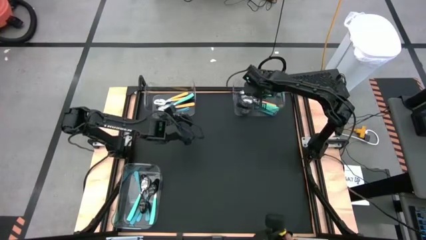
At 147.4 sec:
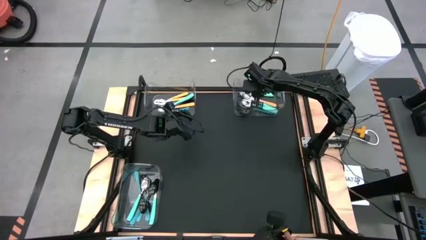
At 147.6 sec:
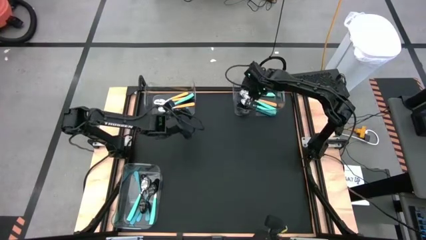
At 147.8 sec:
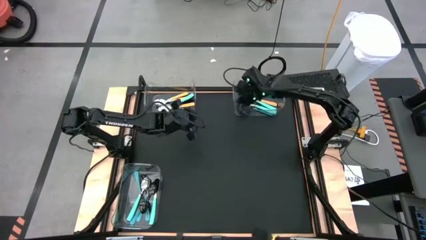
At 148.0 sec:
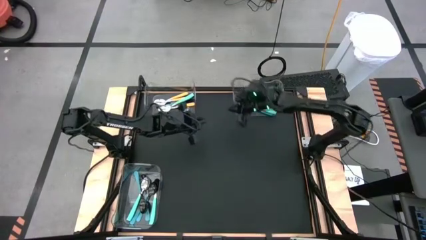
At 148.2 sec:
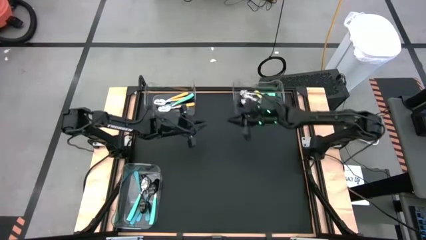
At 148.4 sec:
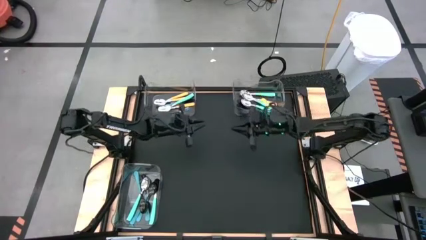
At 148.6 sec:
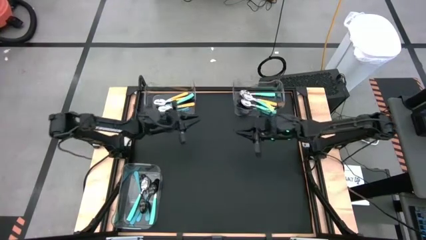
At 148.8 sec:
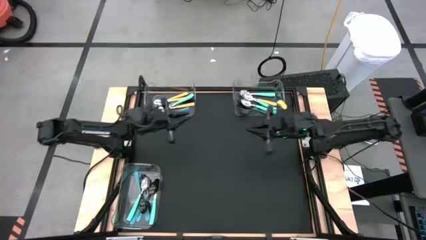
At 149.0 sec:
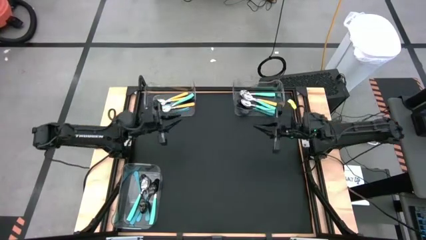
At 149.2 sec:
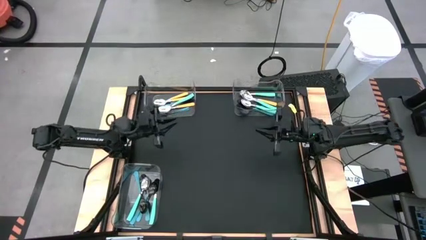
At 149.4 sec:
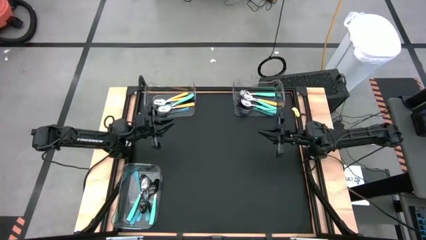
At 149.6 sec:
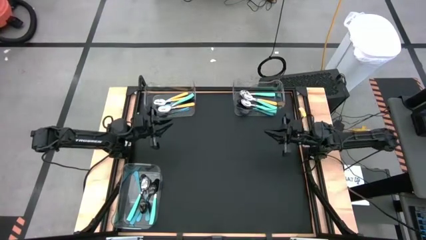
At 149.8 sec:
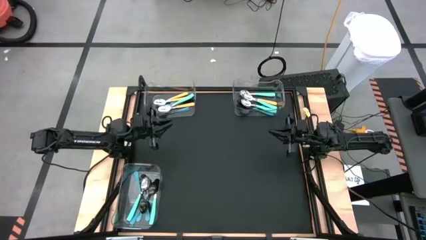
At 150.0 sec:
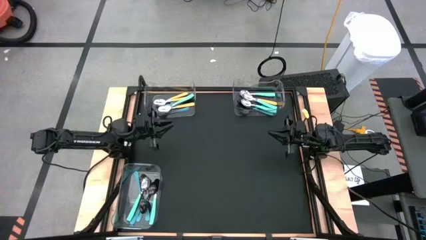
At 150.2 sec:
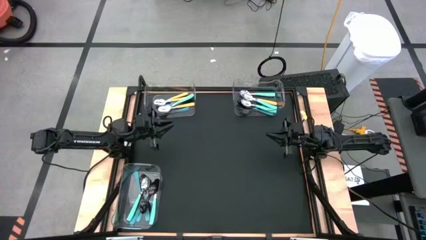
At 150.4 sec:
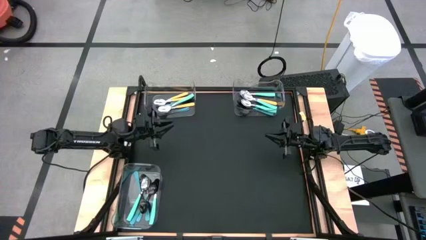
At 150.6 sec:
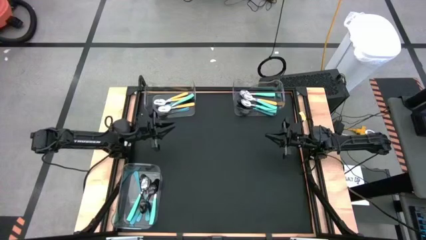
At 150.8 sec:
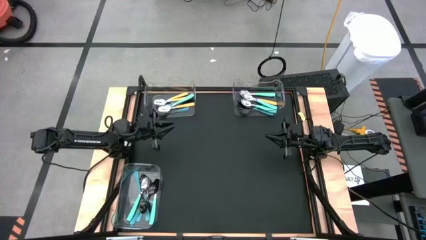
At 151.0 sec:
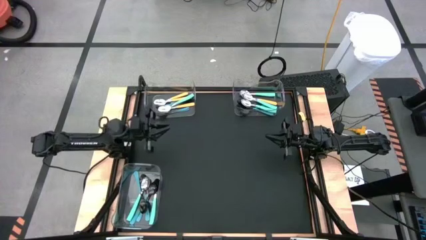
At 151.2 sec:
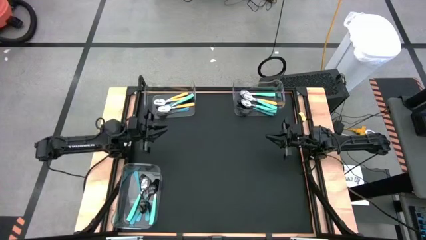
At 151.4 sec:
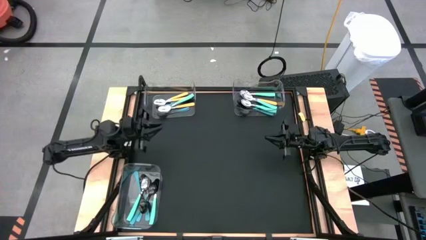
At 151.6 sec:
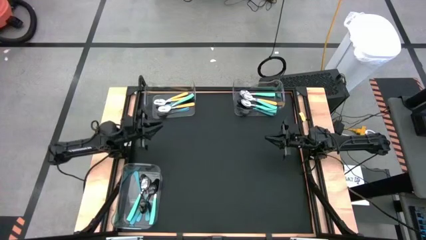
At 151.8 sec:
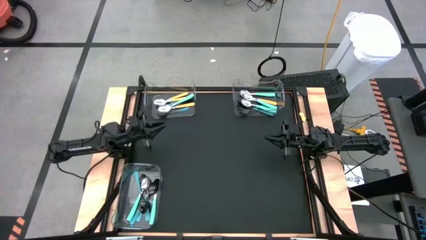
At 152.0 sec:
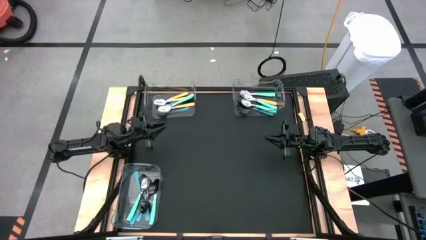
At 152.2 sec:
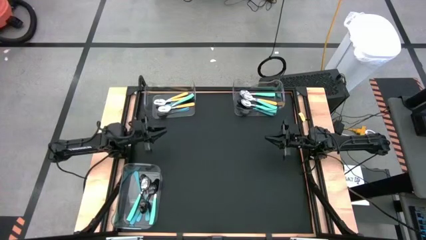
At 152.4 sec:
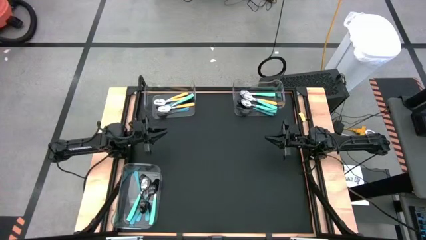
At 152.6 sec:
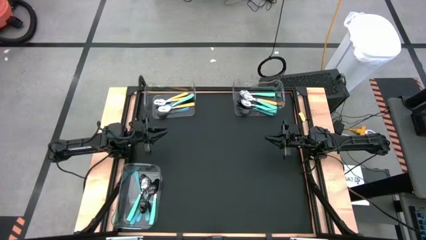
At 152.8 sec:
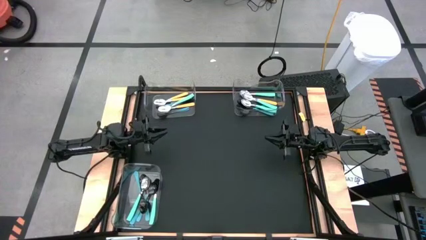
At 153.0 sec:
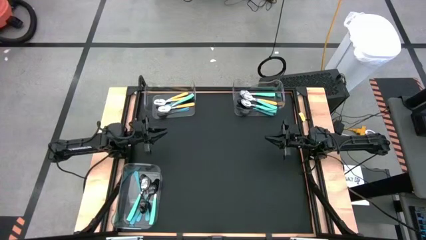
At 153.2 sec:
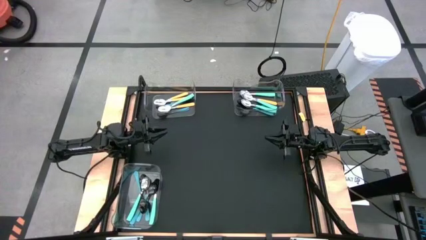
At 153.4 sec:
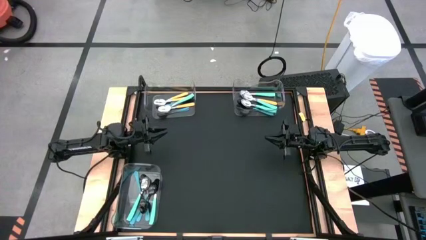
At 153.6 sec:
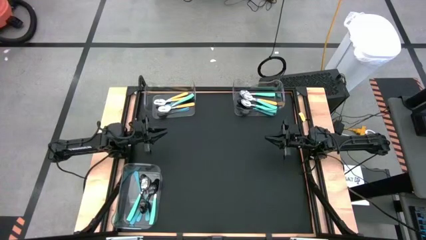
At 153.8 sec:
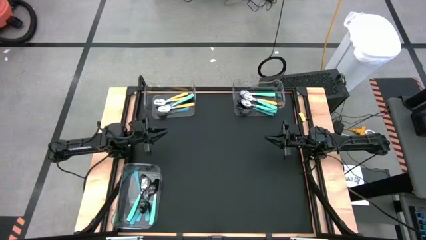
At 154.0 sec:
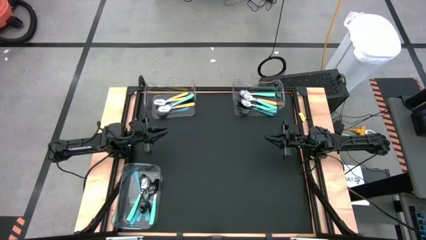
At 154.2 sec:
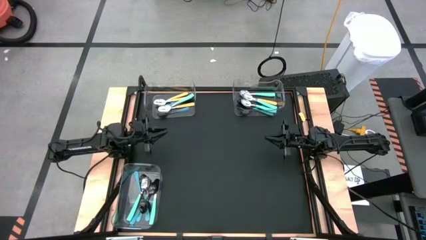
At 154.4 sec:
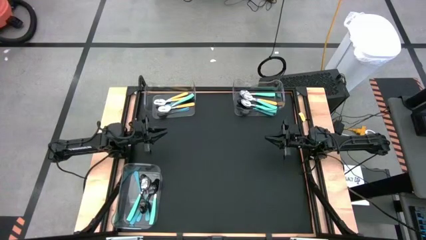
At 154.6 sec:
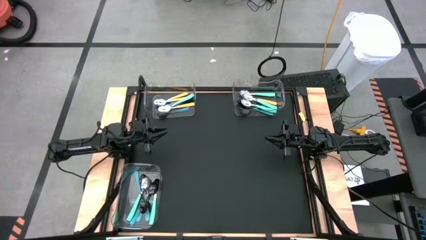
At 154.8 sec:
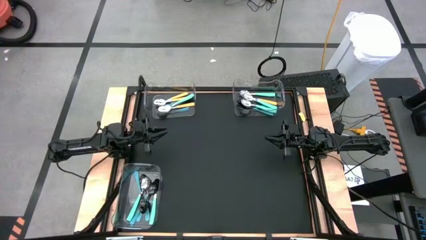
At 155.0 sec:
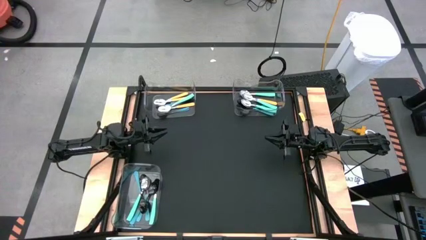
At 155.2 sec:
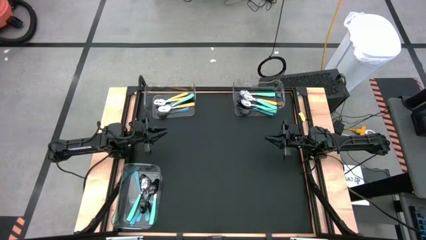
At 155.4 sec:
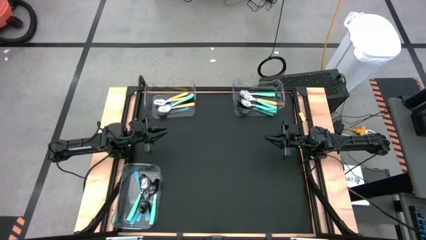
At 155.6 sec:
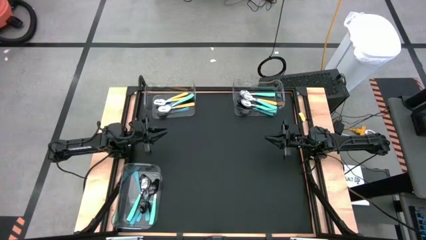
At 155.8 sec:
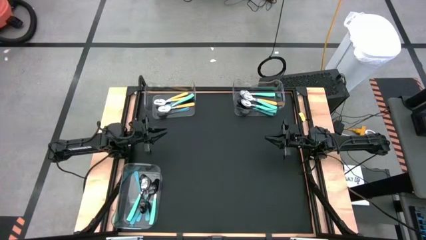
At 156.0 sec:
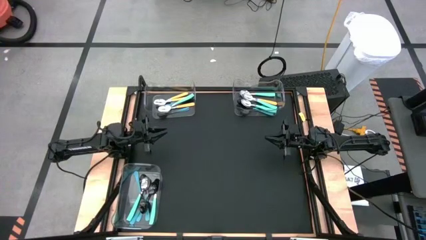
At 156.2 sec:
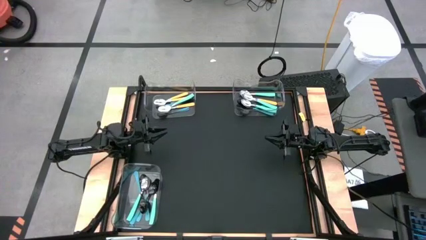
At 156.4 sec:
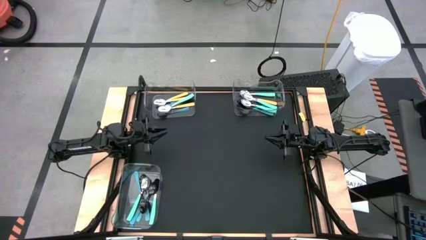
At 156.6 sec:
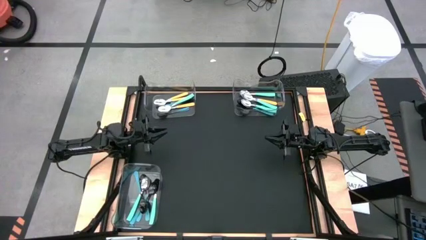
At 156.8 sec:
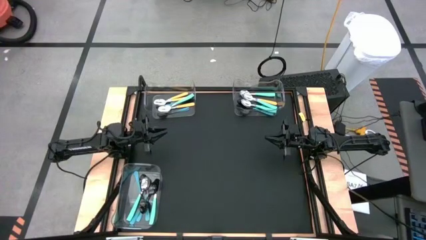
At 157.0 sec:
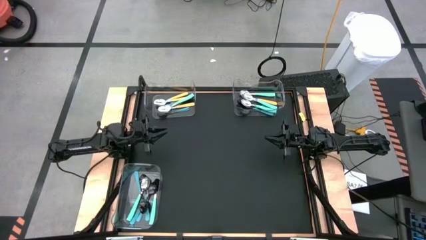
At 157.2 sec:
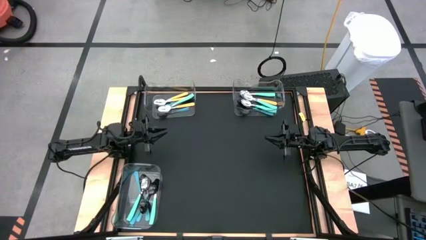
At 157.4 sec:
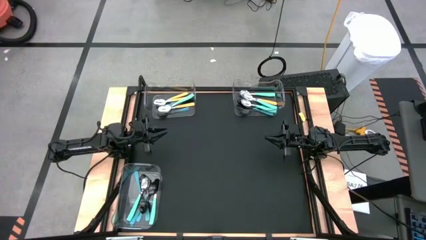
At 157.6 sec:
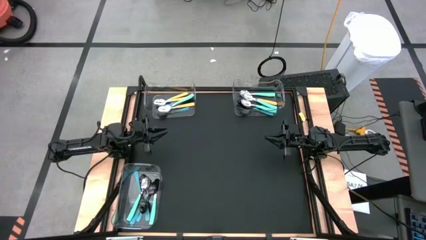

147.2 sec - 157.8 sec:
Task: Sort silverware by color (type)
Return to Home Position

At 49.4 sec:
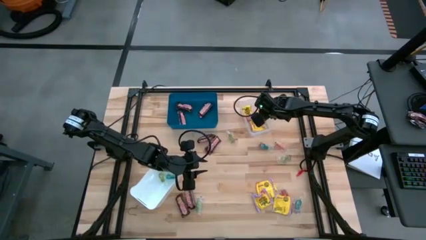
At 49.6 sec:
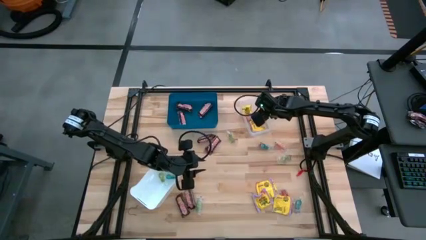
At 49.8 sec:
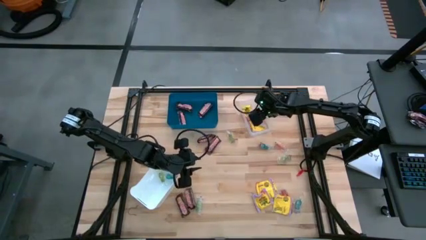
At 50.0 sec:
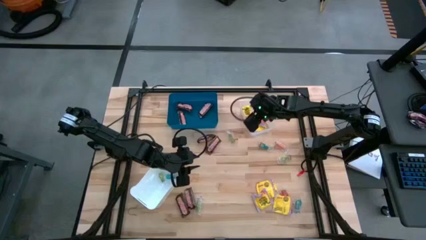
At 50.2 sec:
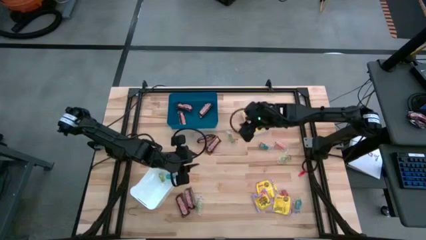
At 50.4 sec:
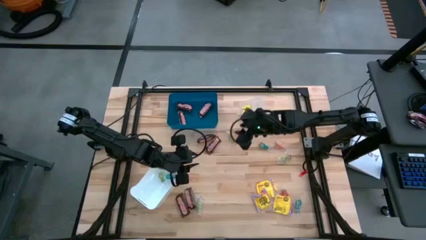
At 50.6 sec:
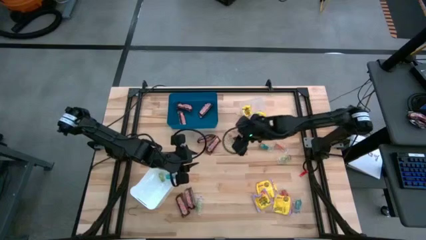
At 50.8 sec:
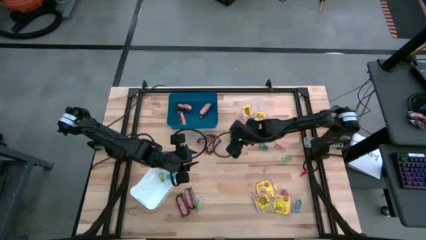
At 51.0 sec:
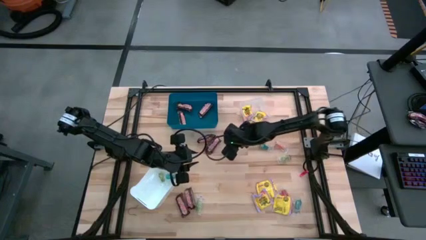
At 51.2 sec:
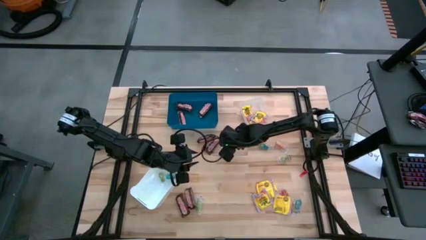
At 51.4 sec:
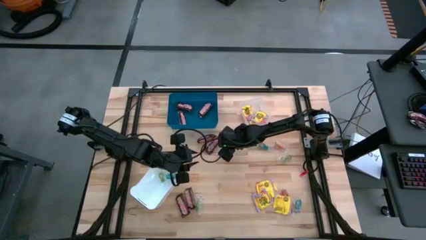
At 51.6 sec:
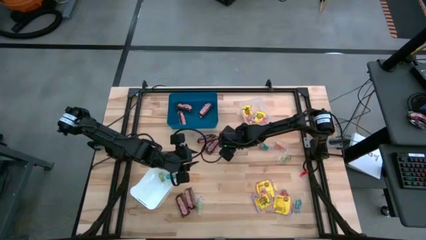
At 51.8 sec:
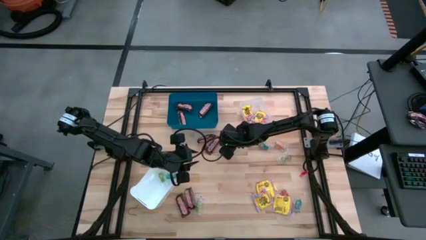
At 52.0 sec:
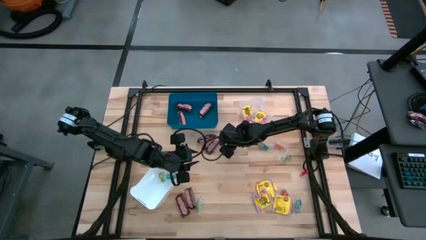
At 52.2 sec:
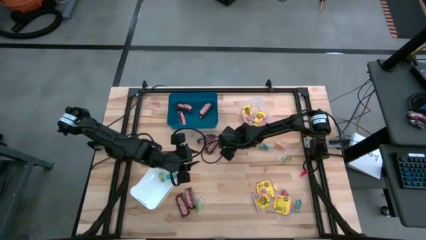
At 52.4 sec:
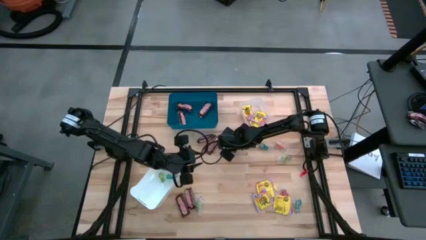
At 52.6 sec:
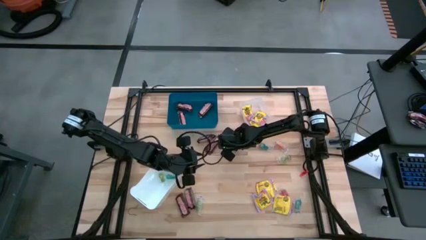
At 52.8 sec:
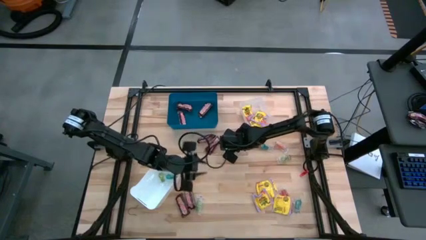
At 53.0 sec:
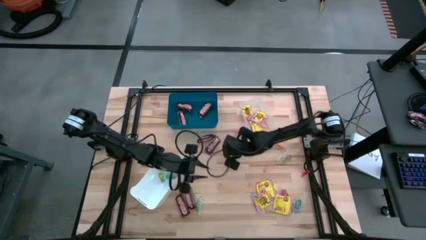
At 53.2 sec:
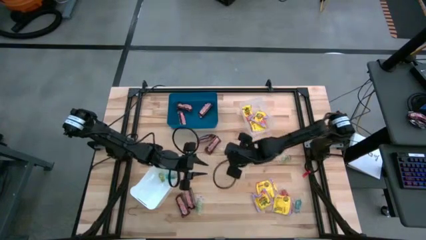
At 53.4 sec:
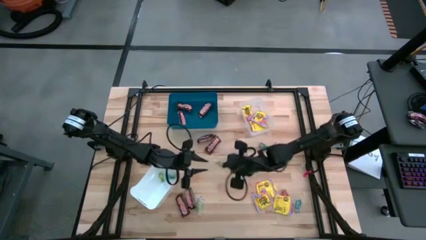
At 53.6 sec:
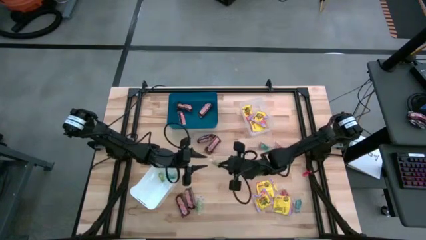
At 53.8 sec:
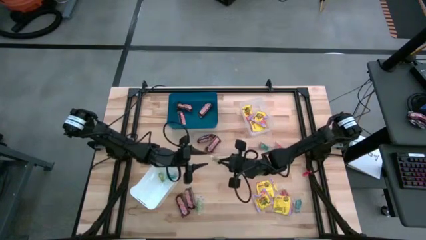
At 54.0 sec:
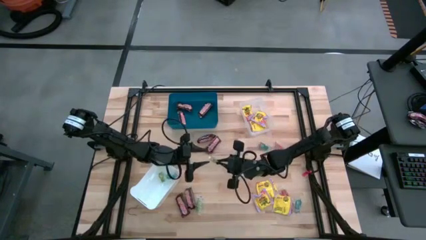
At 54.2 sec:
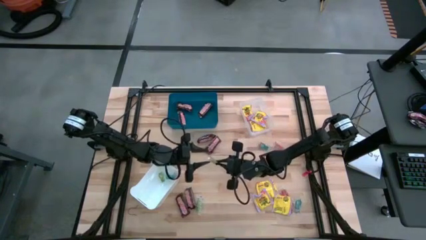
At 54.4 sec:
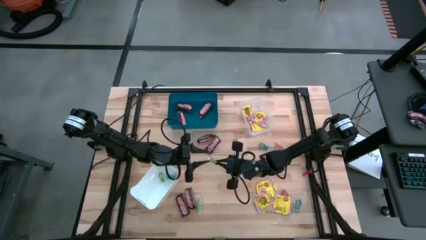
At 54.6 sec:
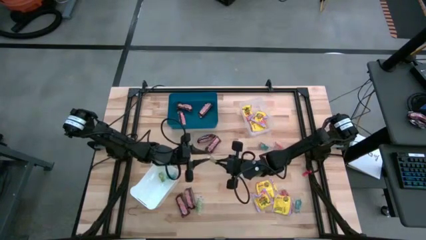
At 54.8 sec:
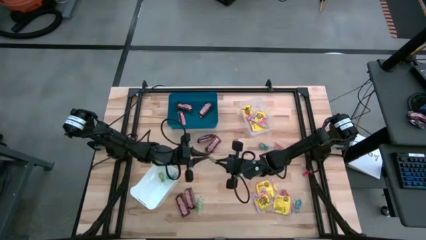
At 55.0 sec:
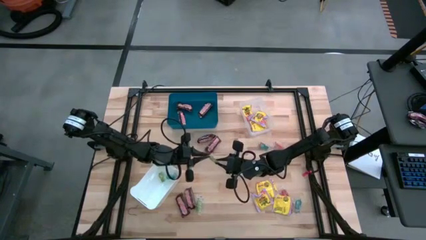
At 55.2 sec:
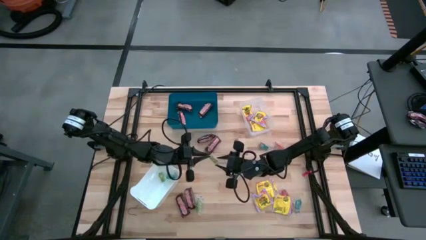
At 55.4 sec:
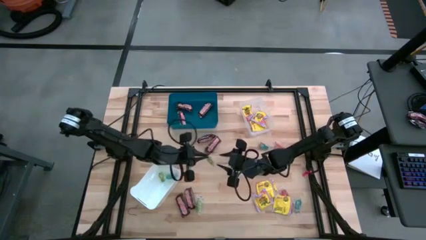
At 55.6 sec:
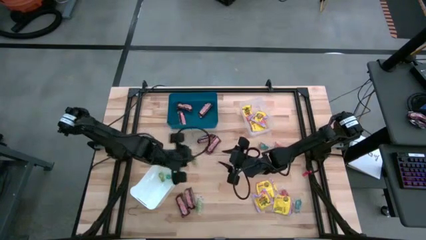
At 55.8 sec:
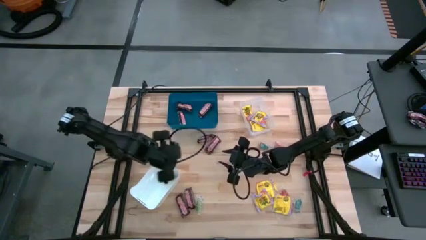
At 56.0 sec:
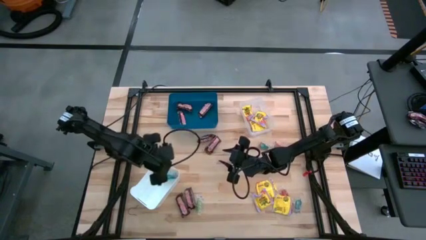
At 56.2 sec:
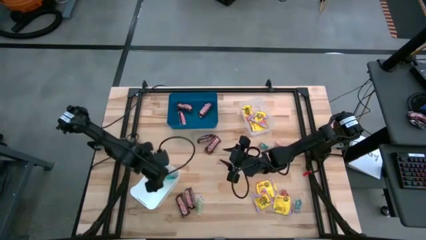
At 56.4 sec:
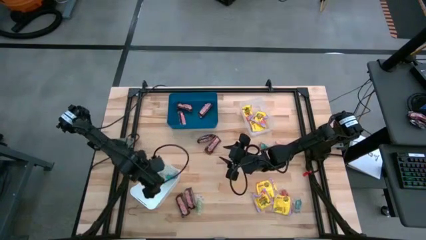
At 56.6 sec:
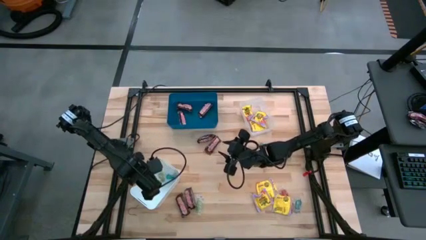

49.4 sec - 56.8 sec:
Task: Sort candy
Put the green gummy into the white bin
